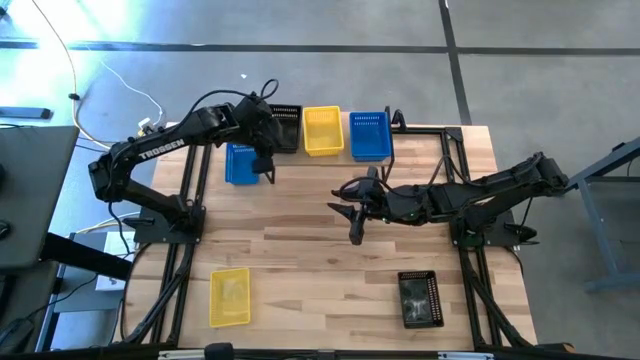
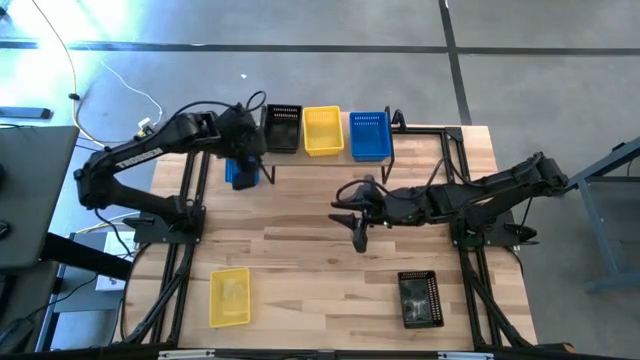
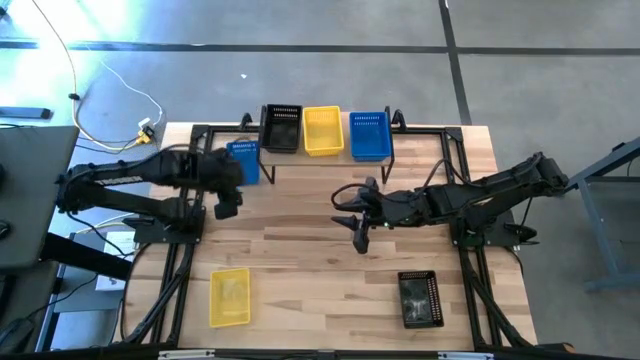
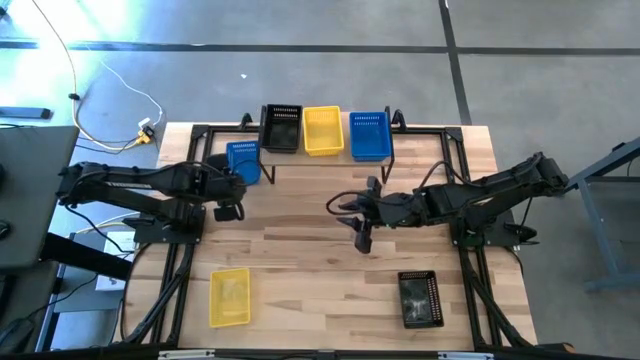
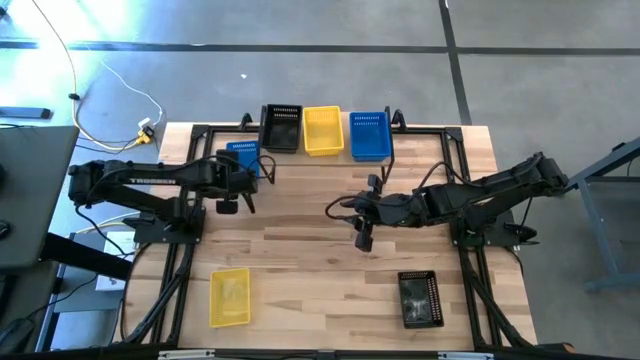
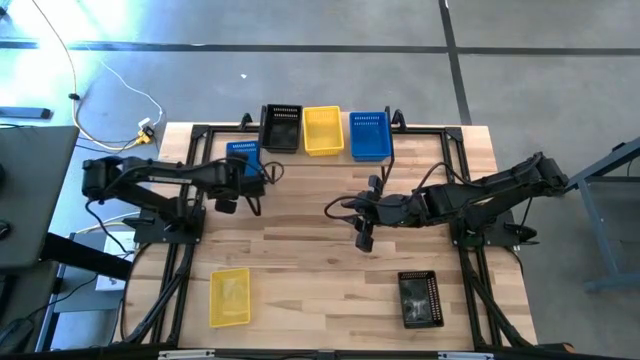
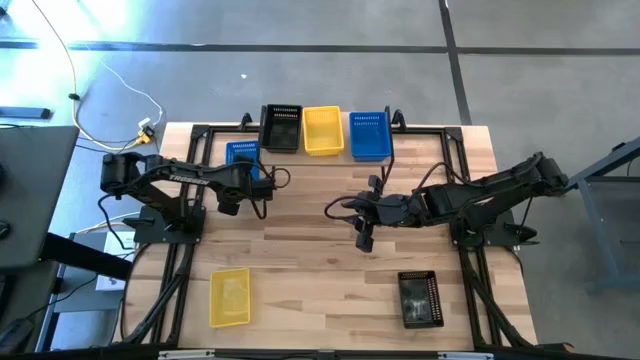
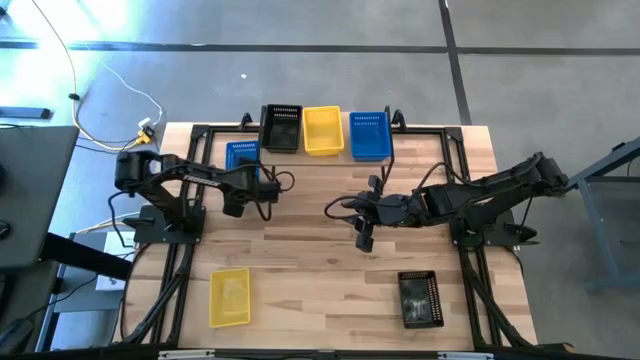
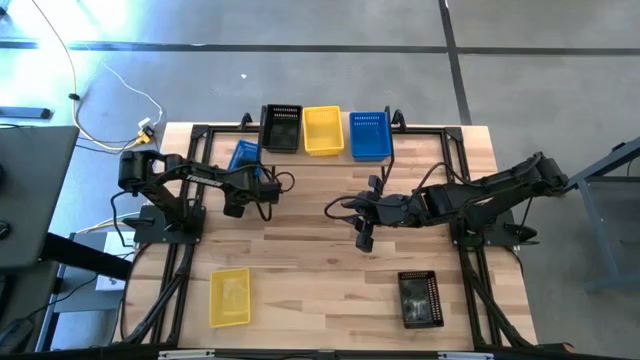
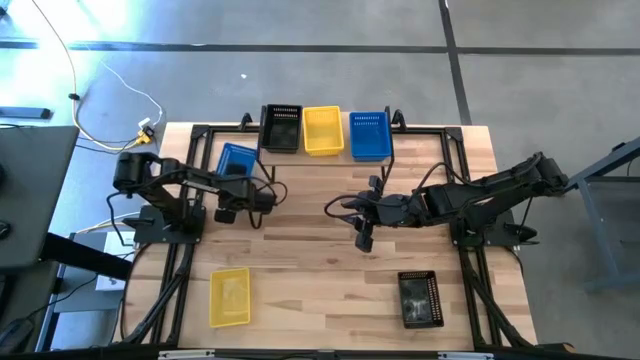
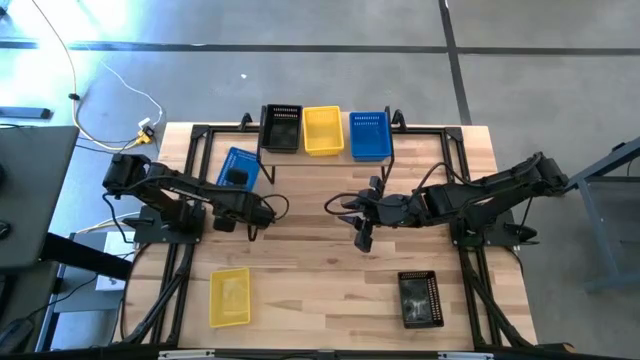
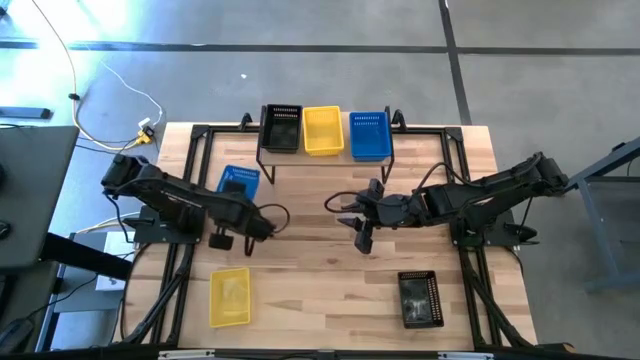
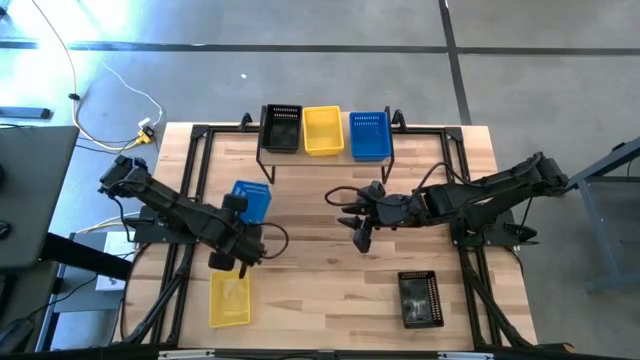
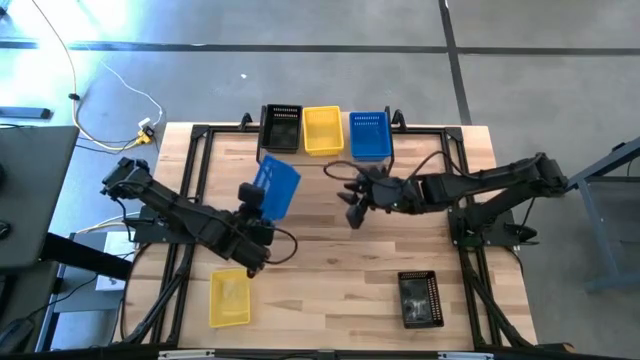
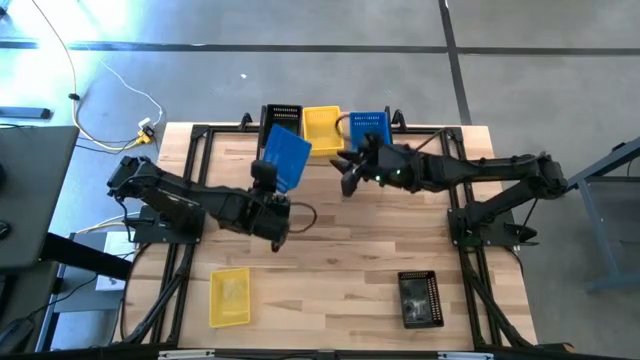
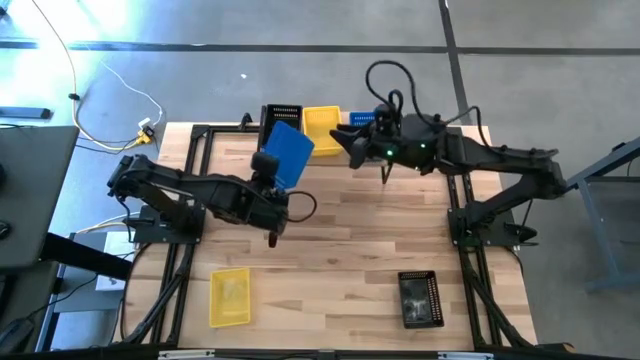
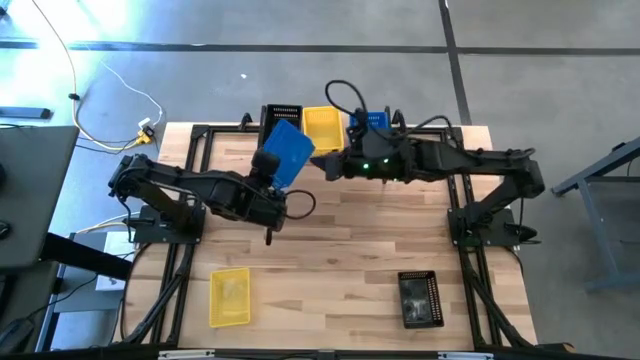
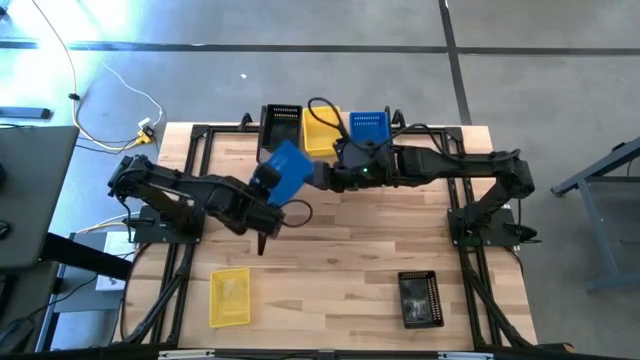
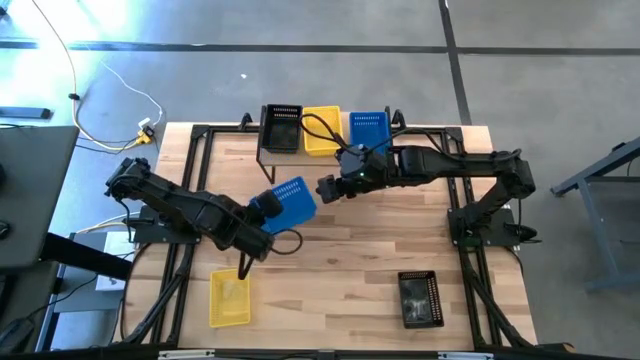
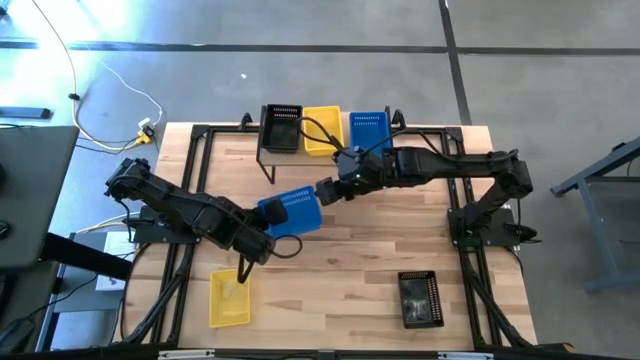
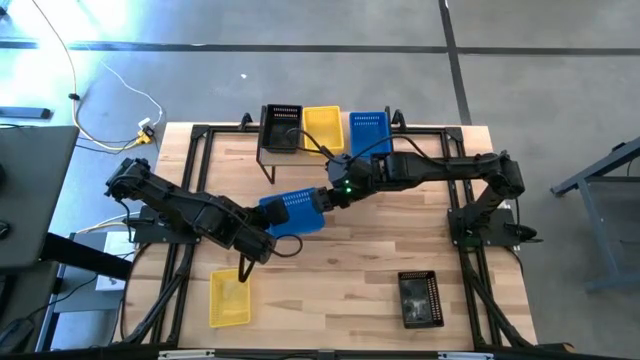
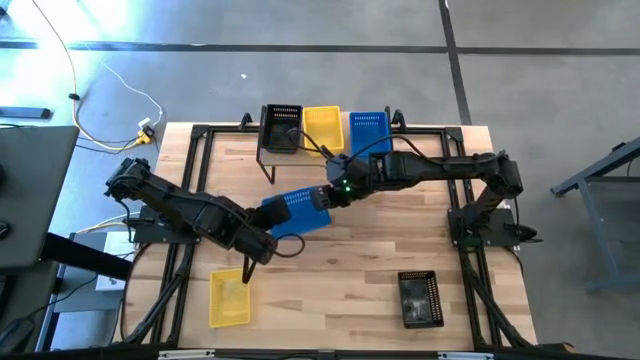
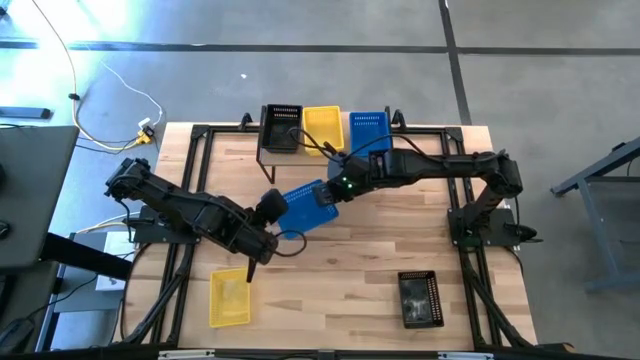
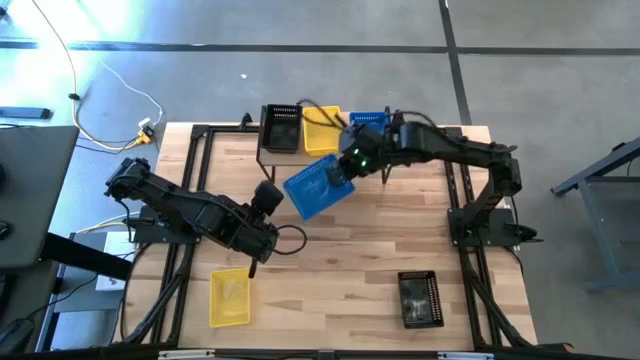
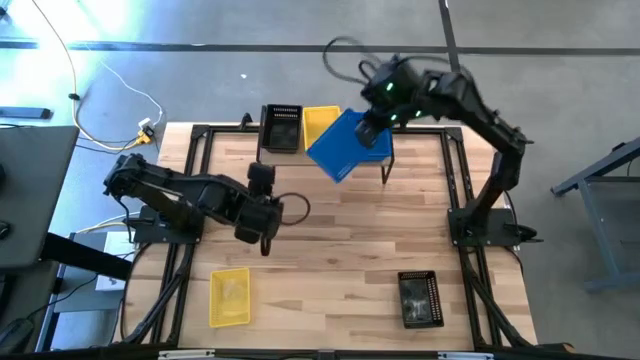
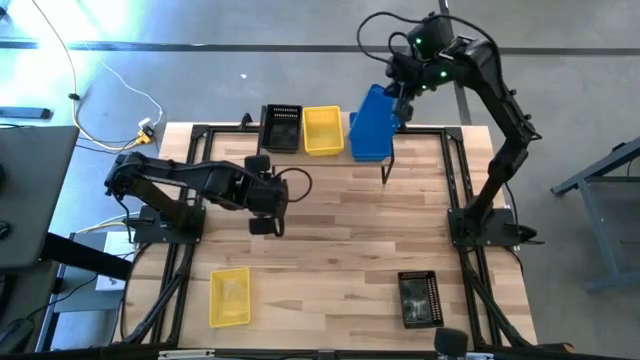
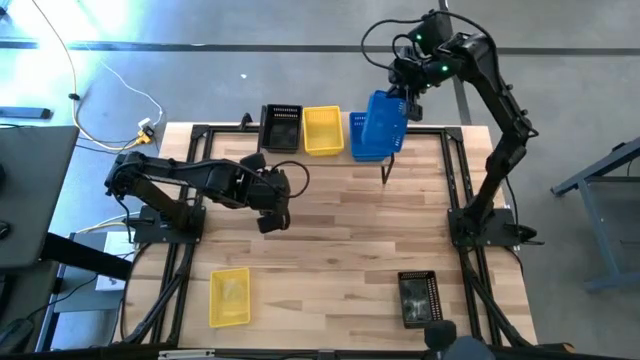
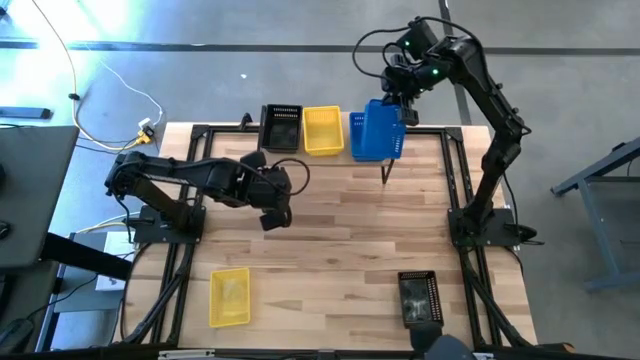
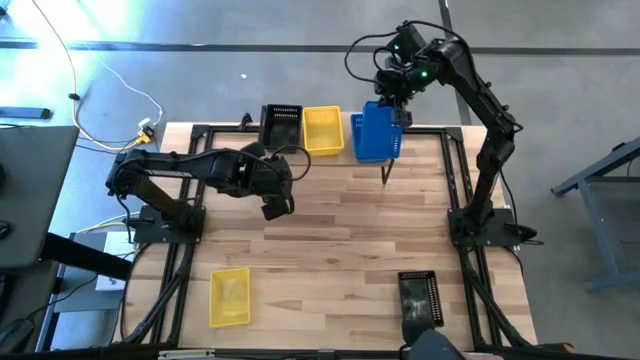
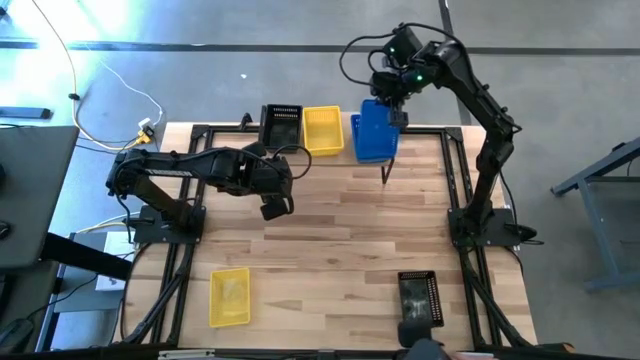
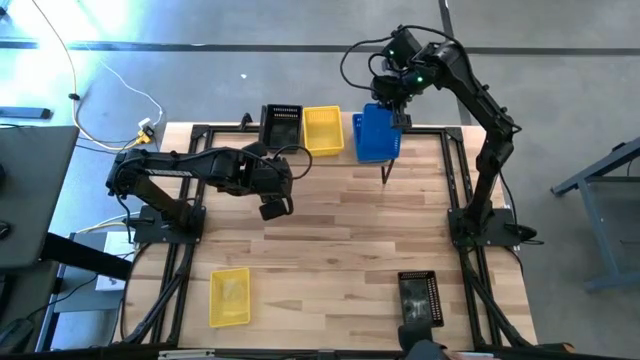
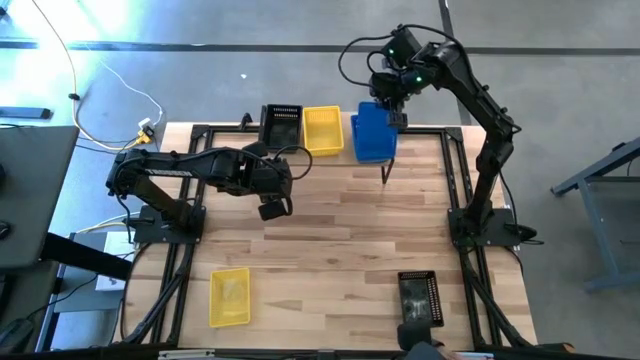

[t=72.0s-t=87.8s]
Task: Stack baskets on shelf by color
Stack the blue bin on top of the blue bins on the shelf

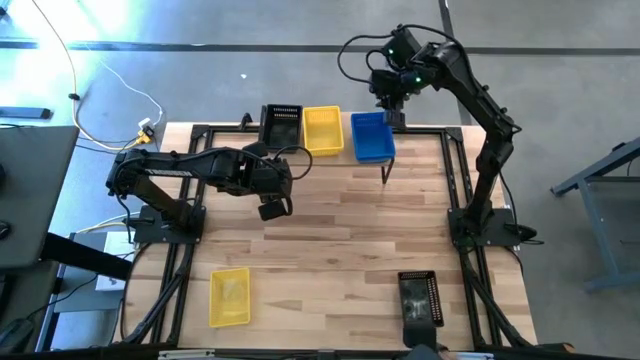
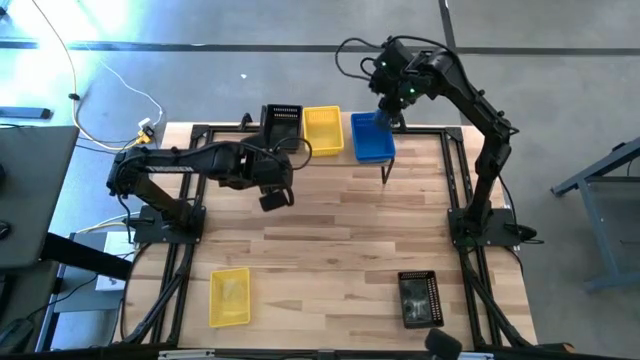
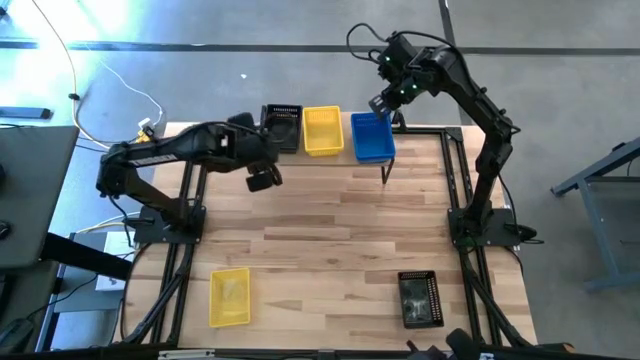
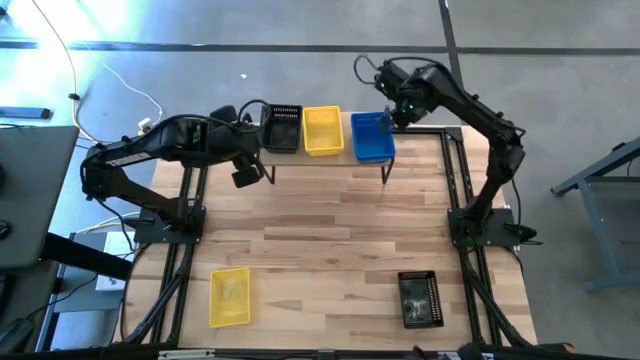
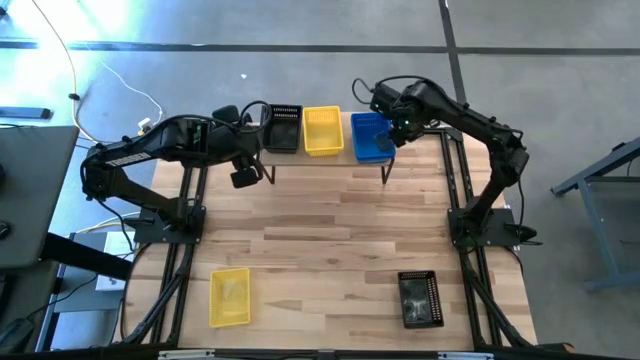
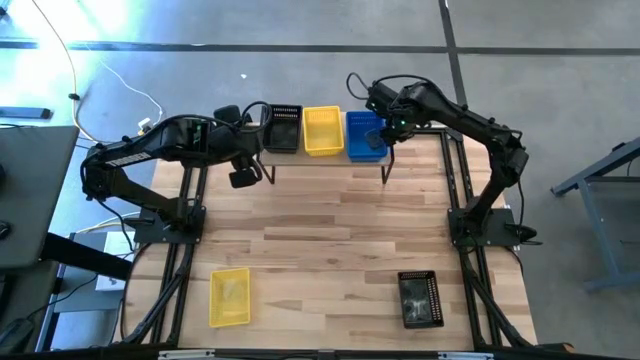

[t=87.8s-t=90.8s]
Adjust the stack of blue bins on the shelf

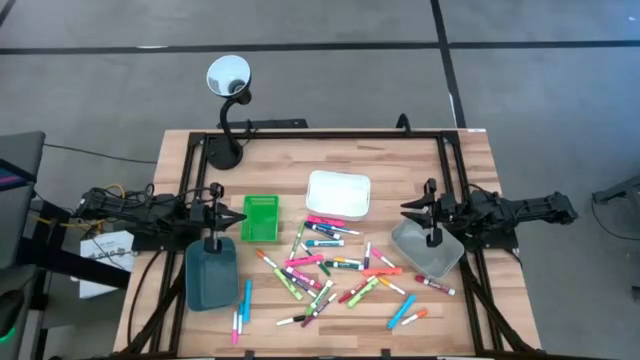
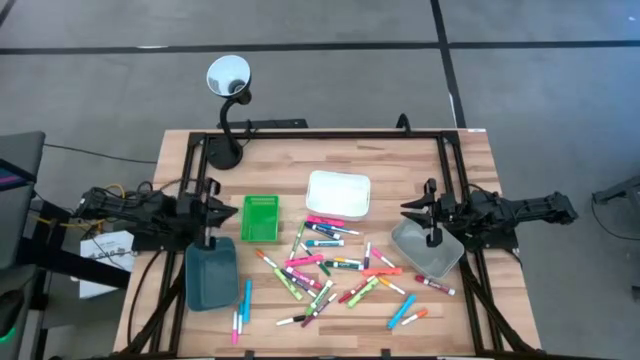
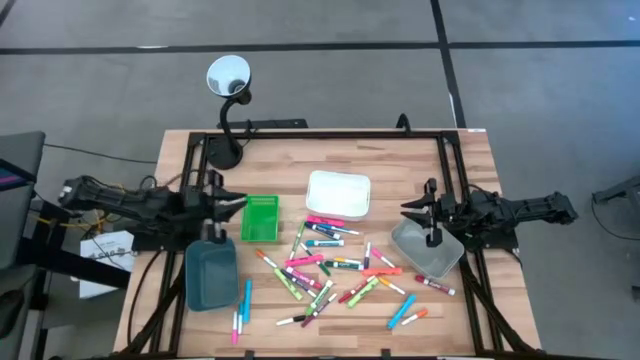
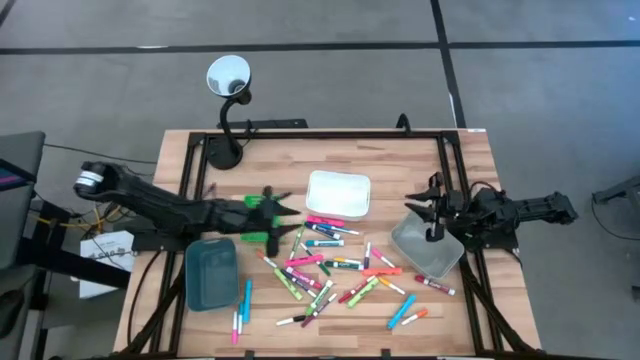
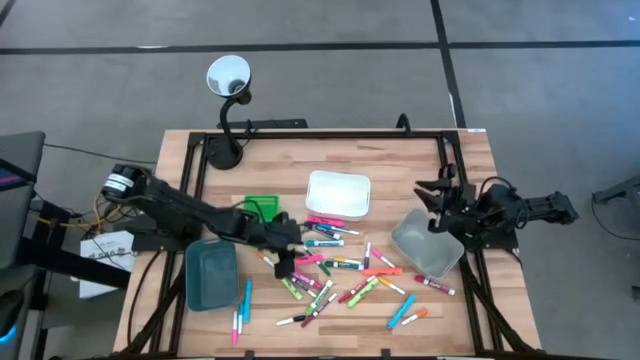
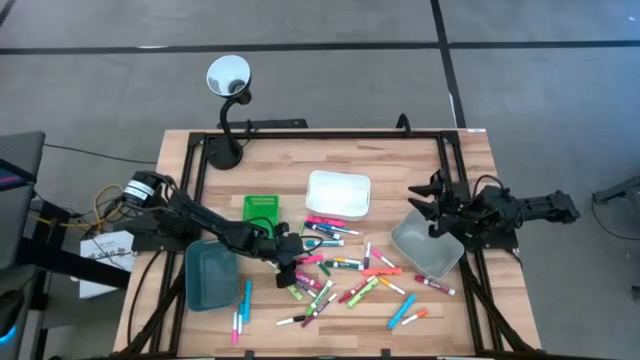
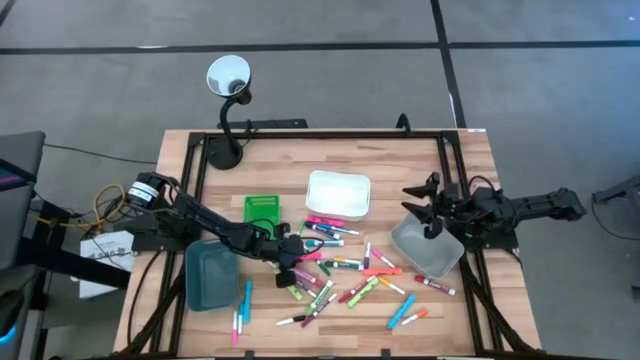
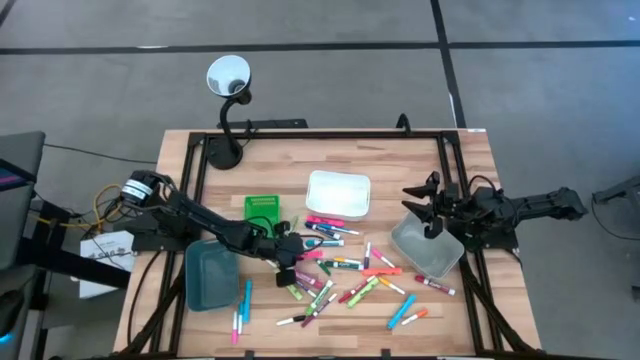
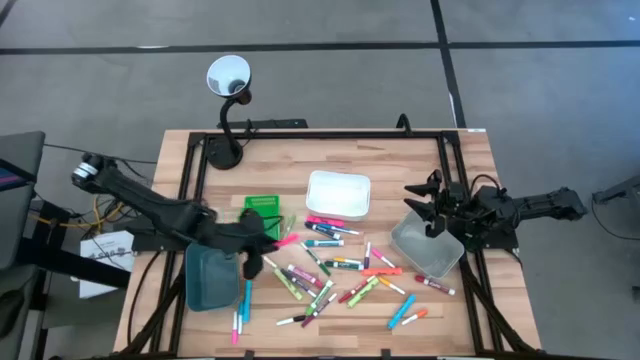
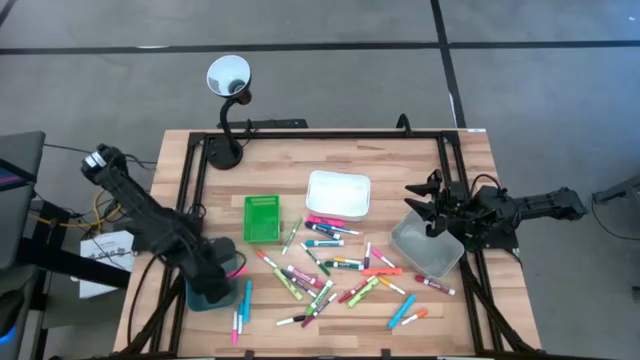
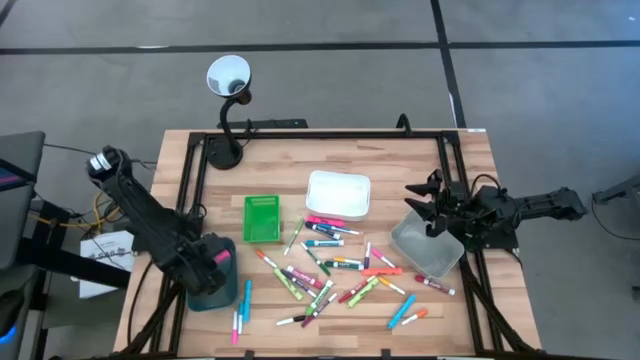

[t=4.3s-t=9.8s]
Task: Pick & Place Markers
Put the big pink highlighter pen into the blue bin
